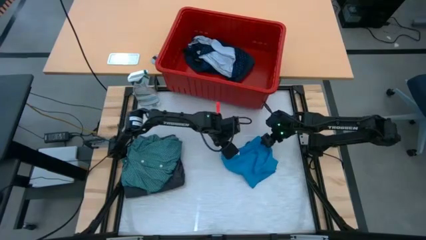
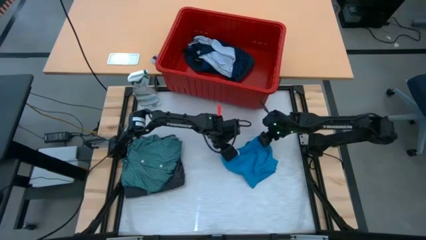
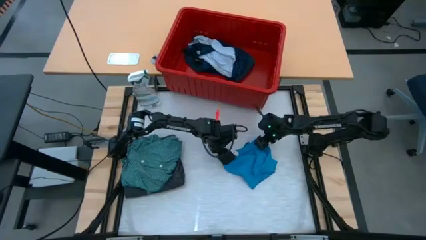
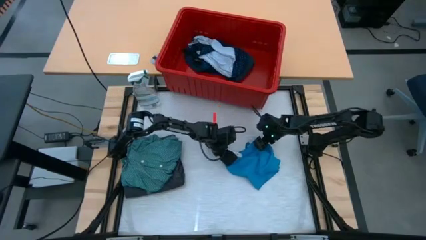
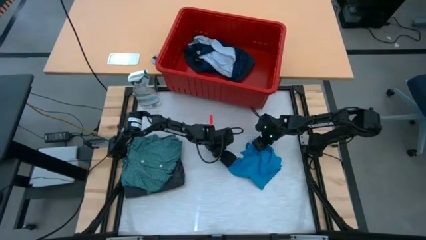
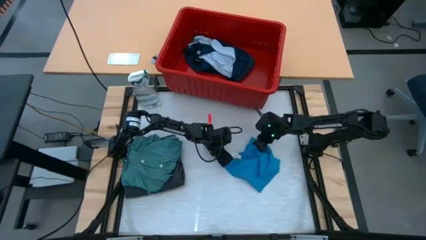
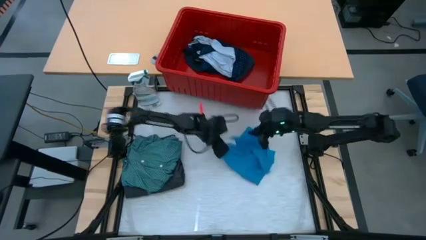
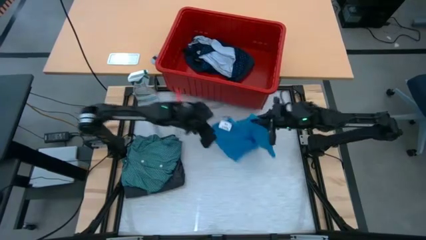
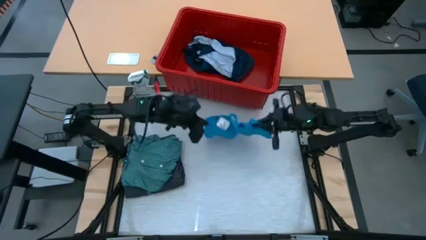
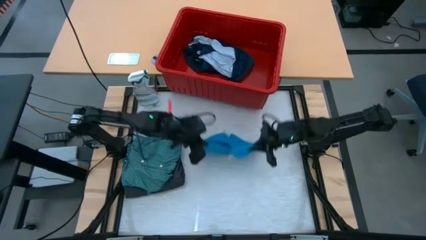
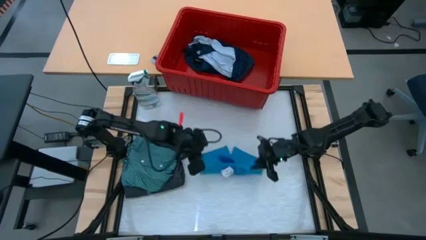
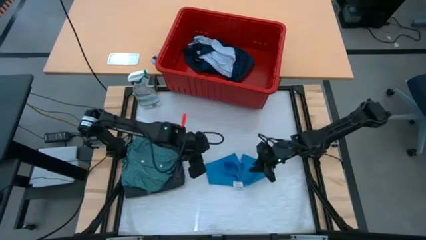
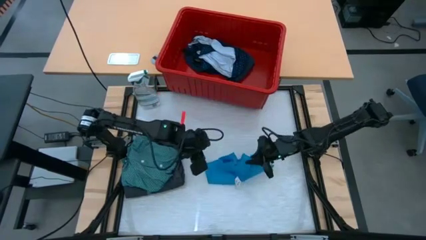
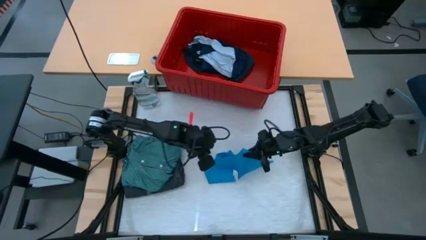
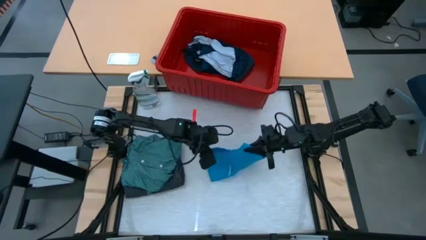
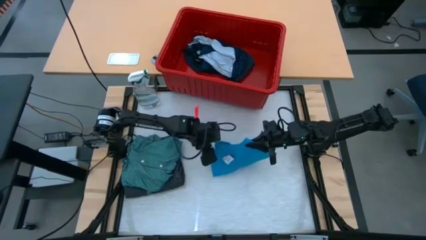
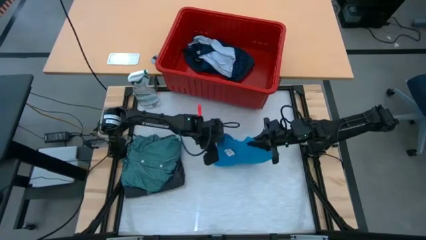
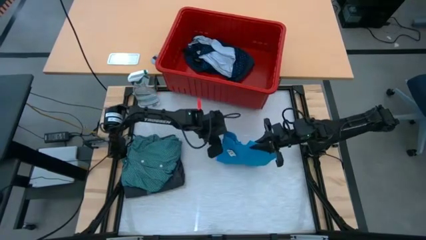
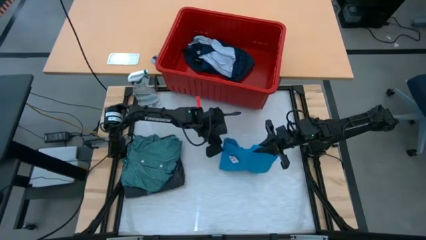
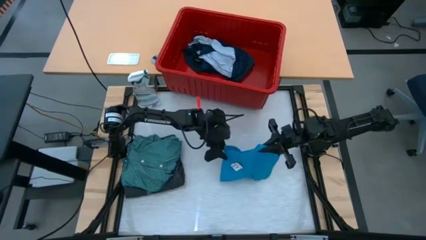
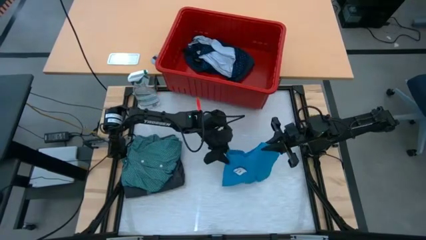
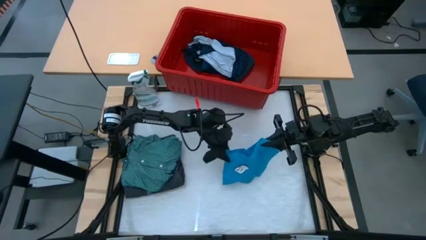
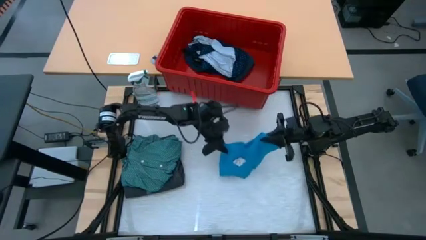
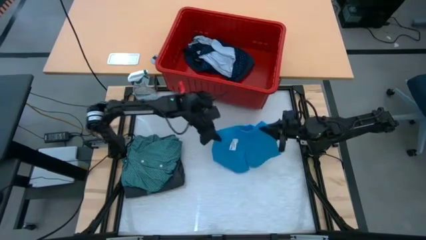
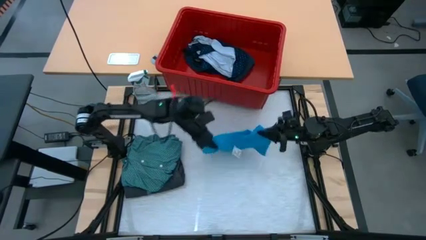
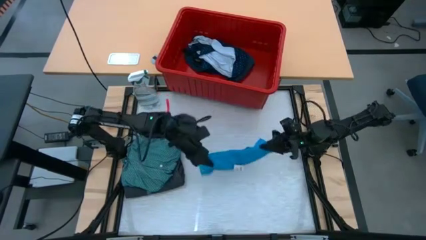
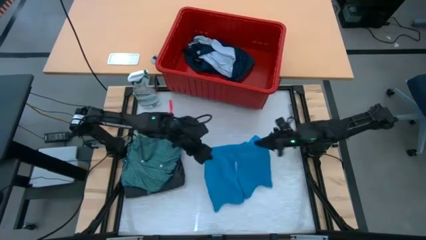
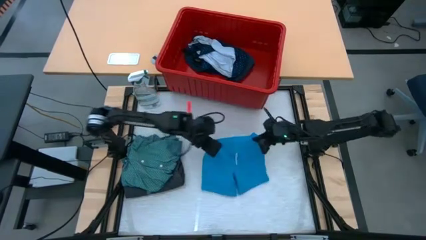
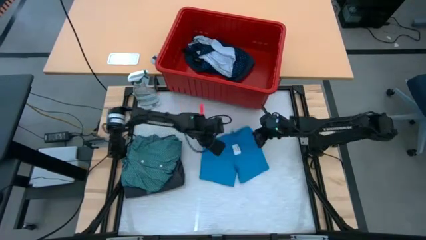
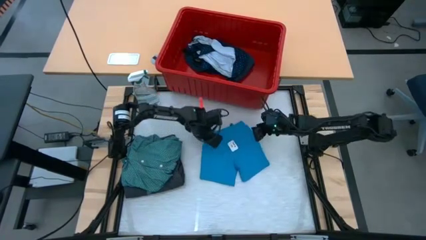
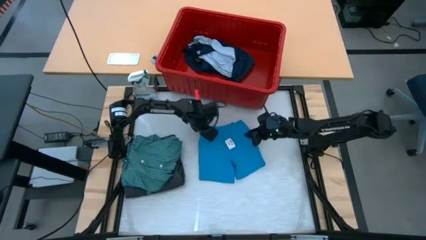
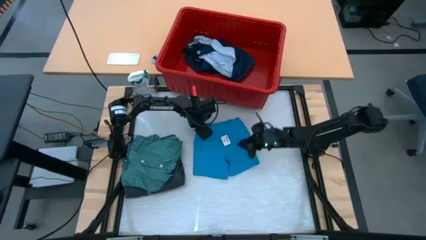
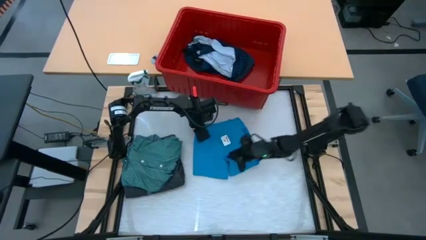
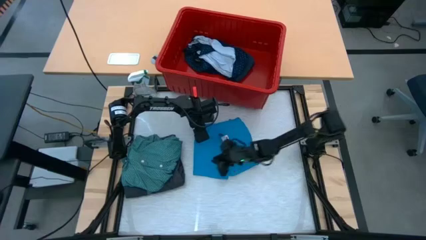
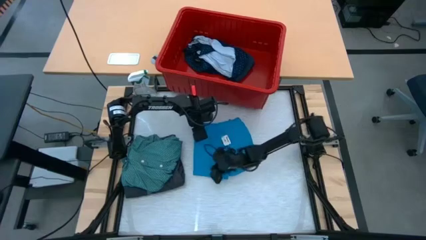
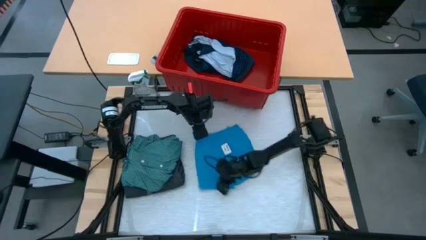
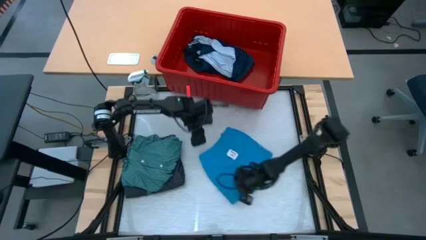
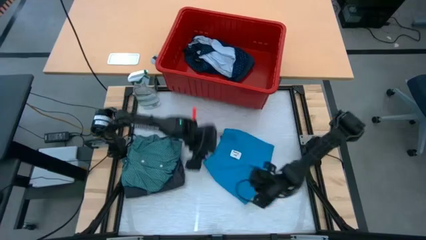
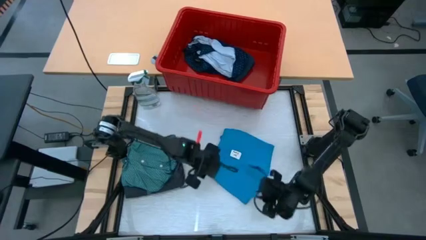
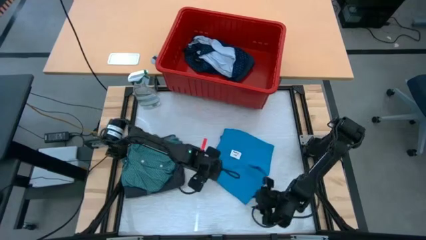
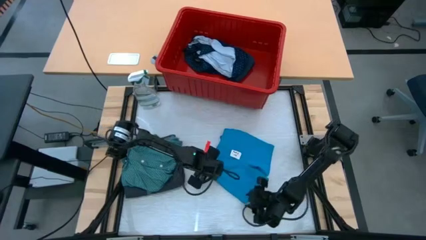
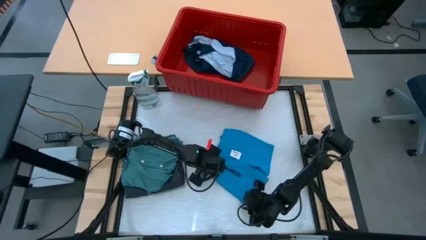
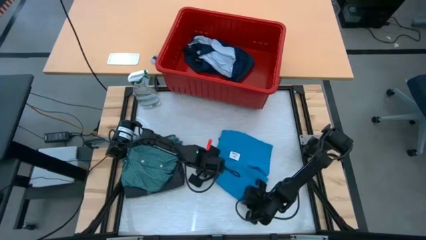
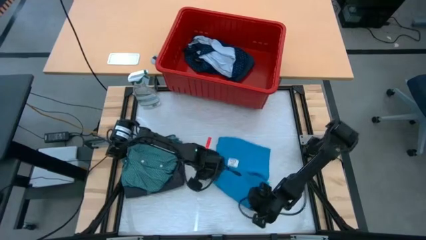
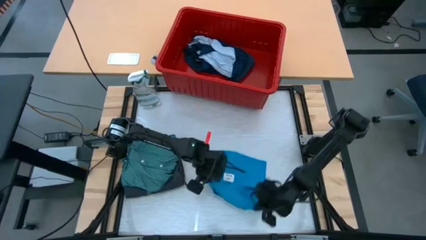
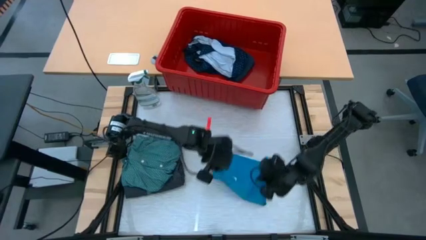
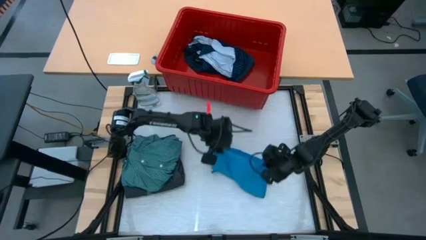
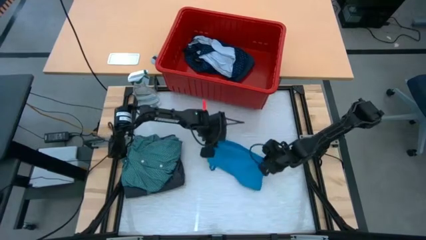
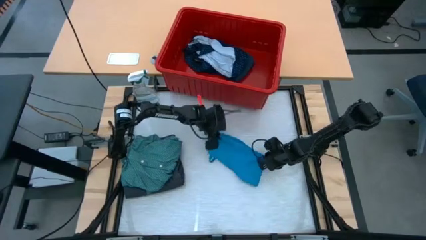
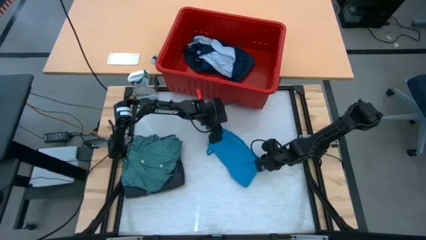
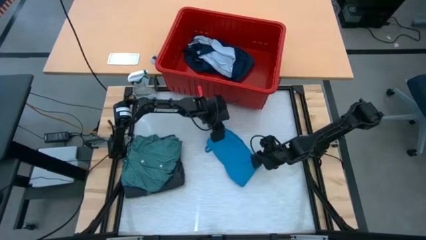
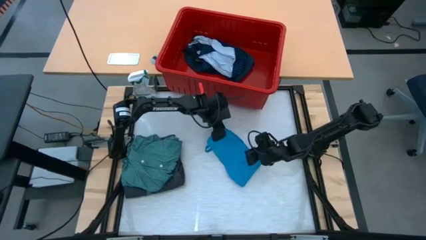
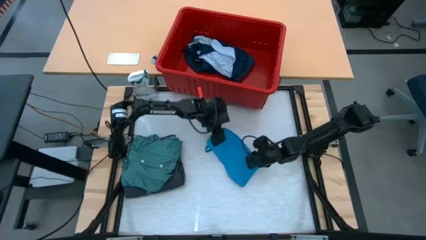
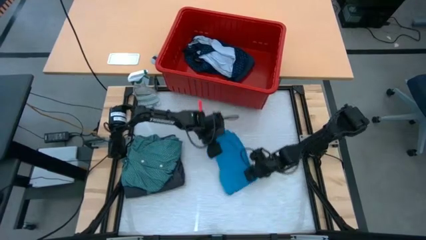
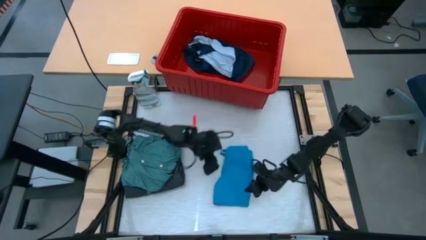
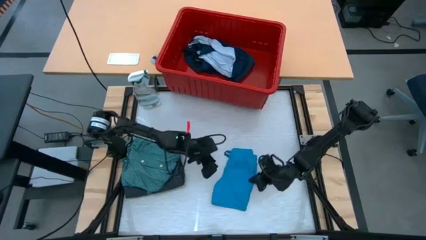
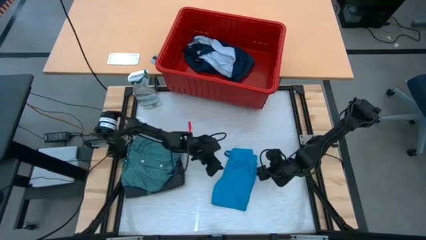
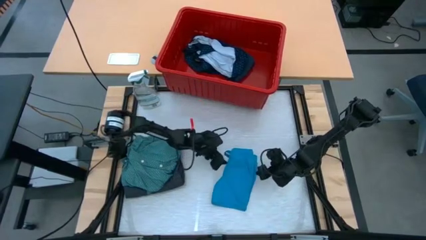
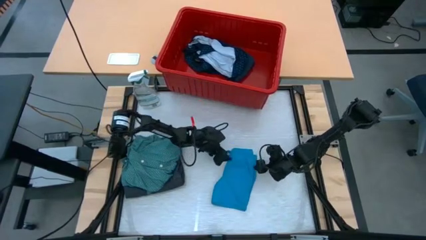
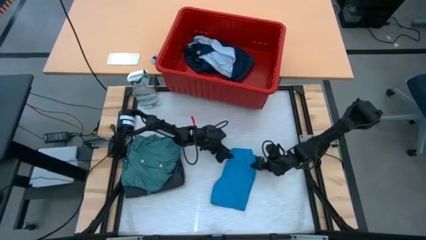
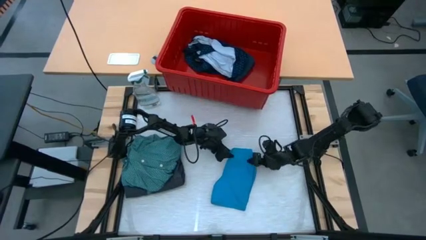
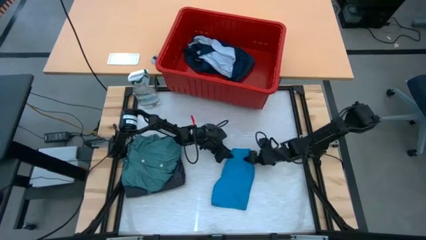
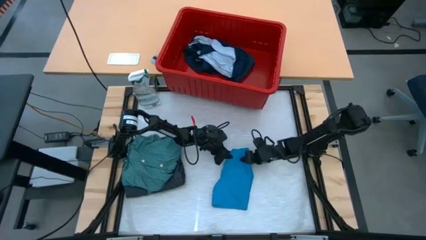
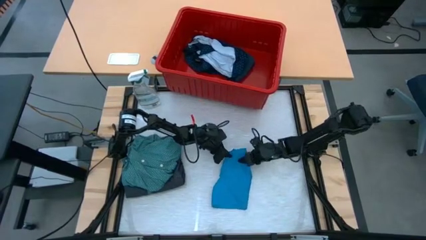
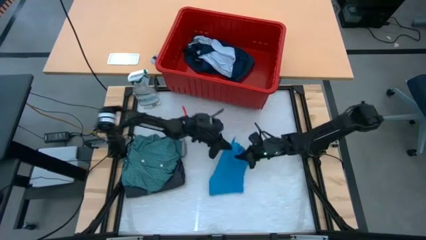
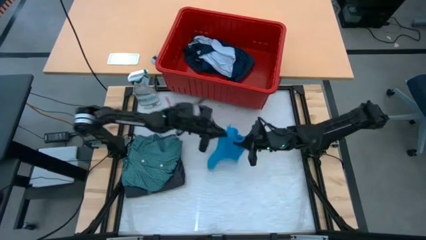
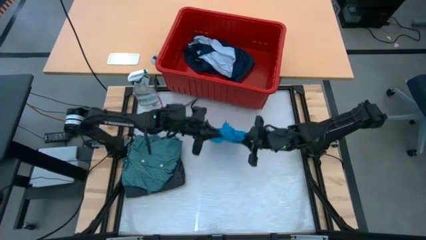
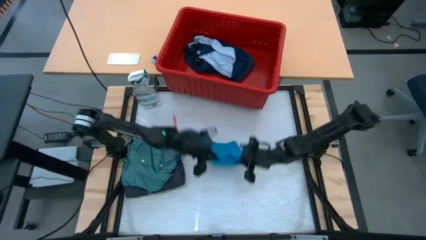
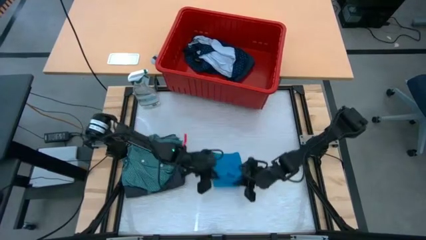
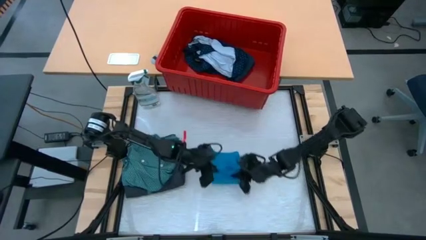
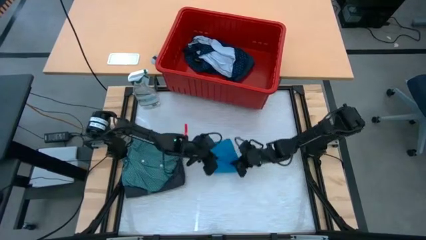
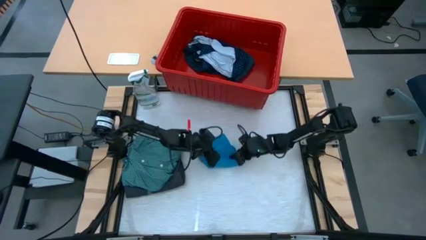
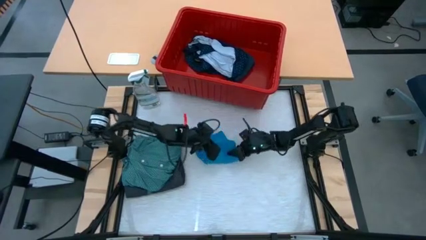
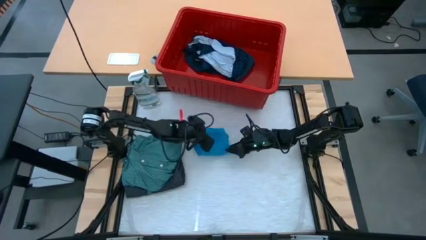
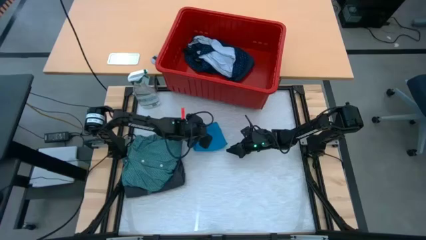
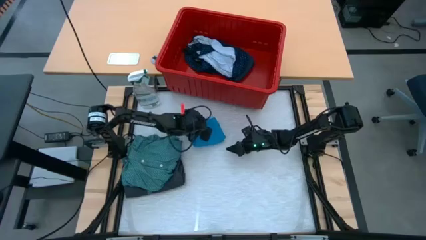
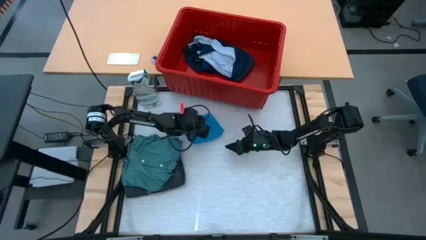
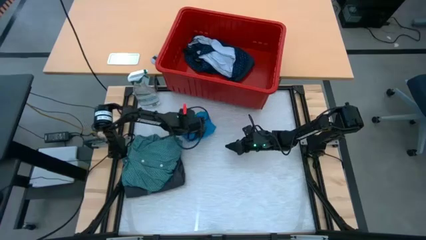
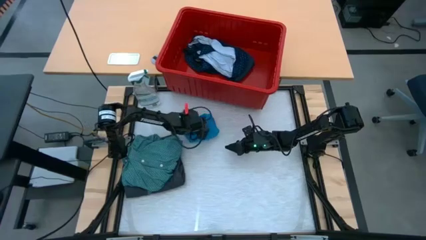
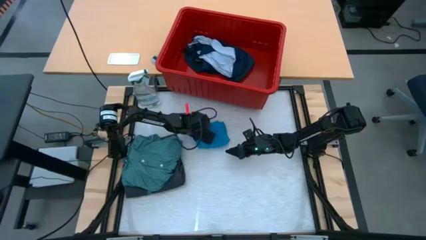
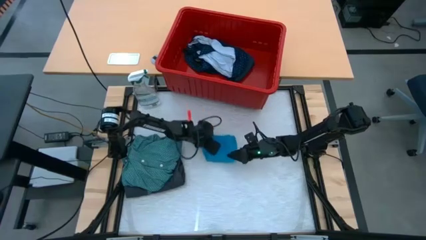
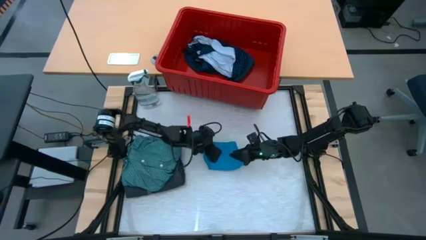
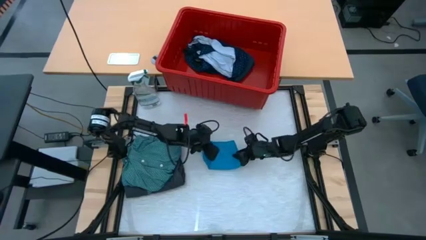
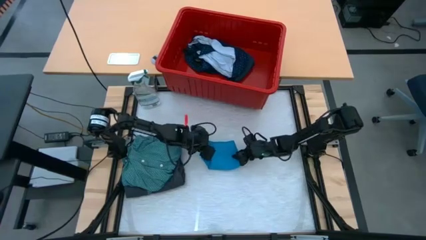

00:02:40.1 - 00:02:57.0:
Task: Fold laundry
Fold the light blue shorts
